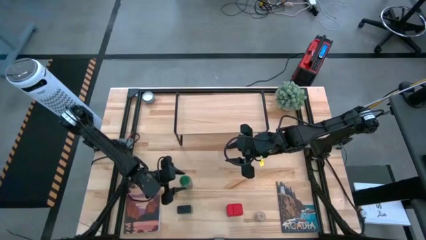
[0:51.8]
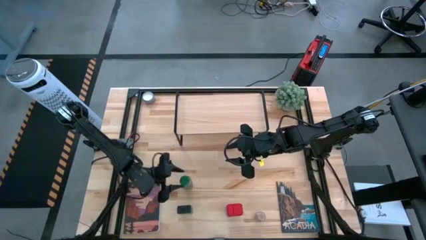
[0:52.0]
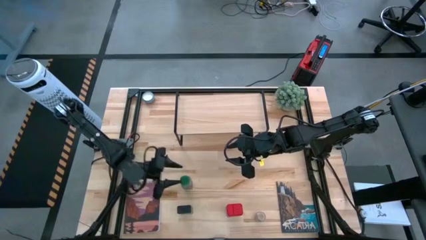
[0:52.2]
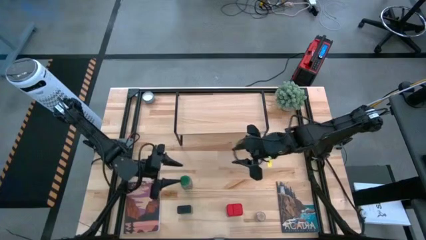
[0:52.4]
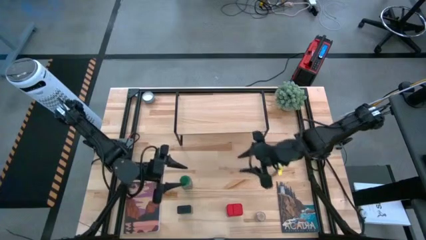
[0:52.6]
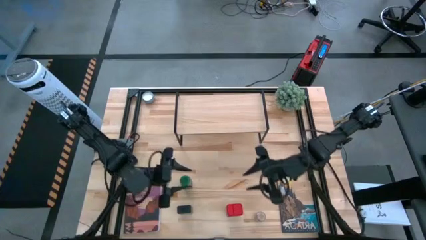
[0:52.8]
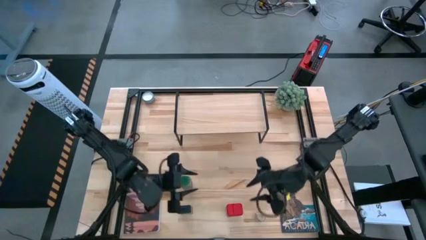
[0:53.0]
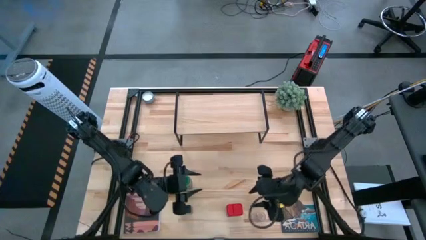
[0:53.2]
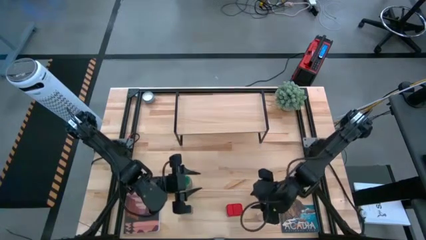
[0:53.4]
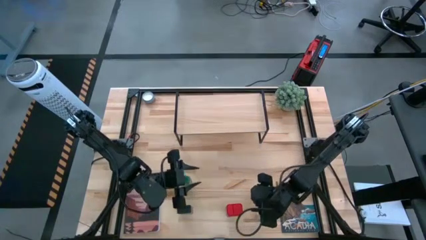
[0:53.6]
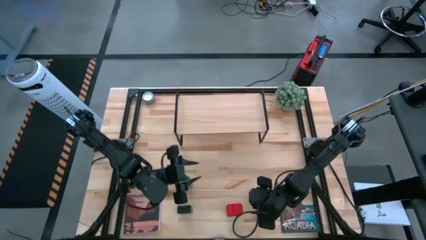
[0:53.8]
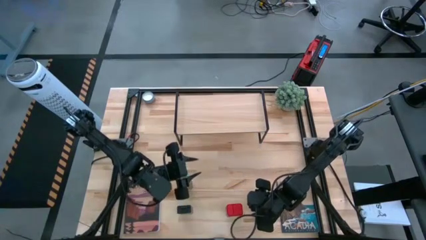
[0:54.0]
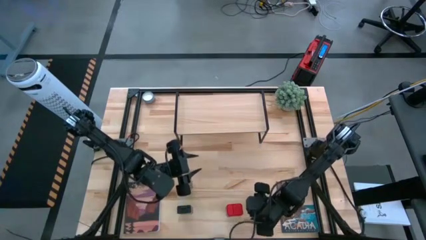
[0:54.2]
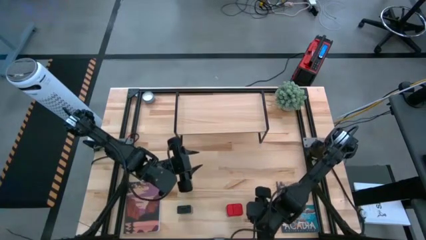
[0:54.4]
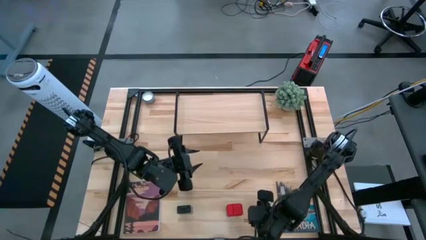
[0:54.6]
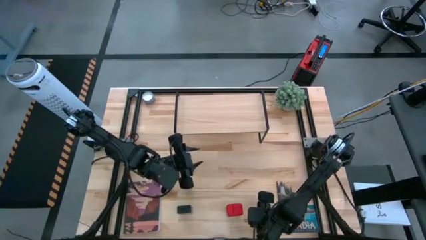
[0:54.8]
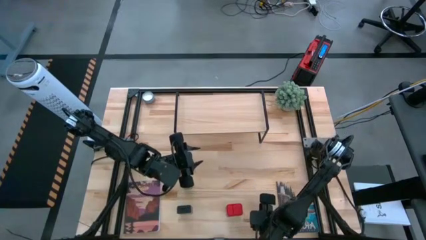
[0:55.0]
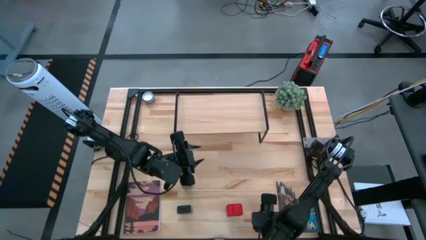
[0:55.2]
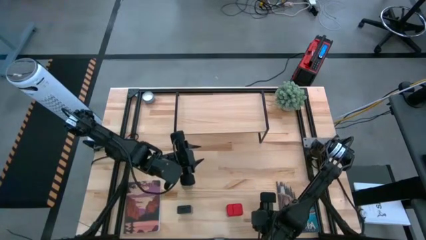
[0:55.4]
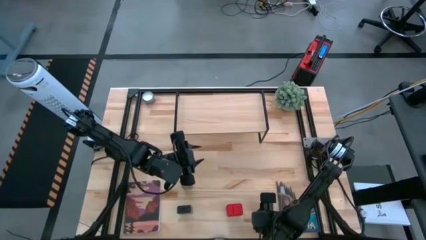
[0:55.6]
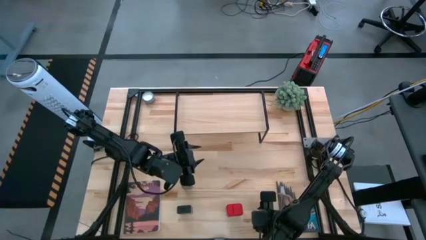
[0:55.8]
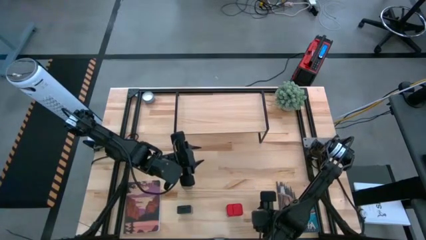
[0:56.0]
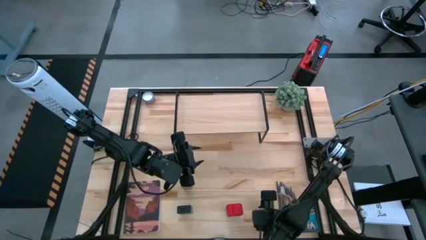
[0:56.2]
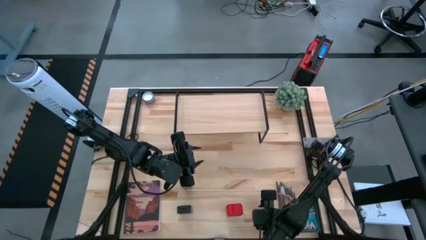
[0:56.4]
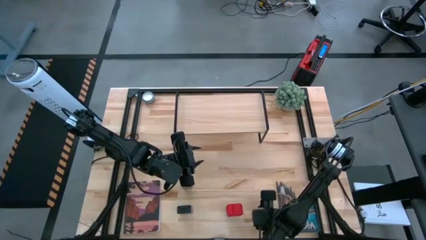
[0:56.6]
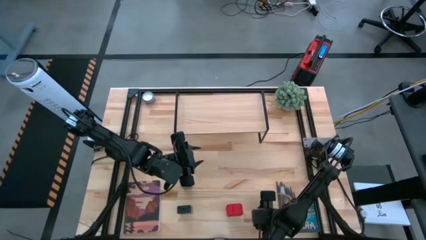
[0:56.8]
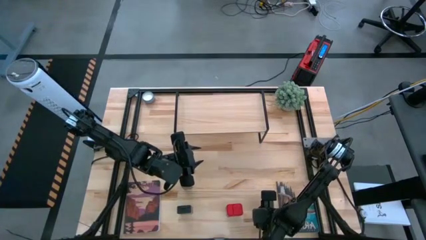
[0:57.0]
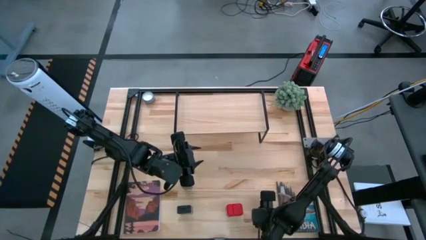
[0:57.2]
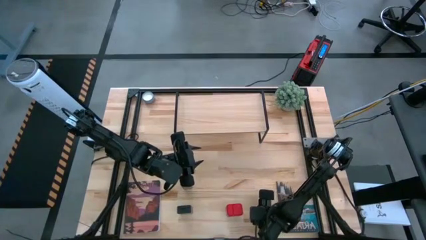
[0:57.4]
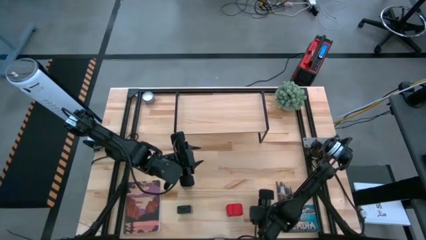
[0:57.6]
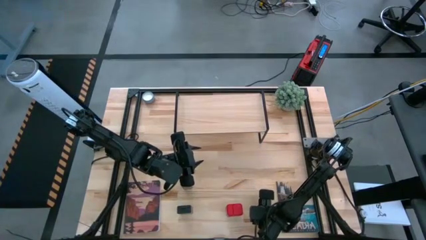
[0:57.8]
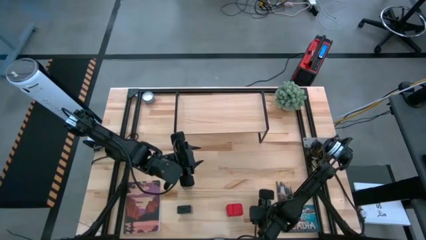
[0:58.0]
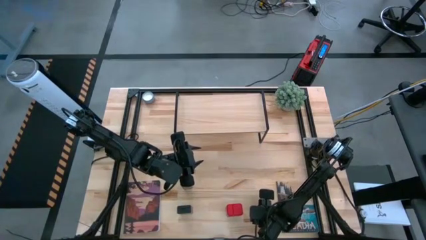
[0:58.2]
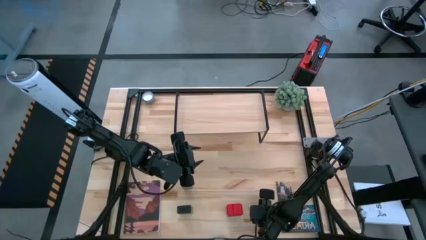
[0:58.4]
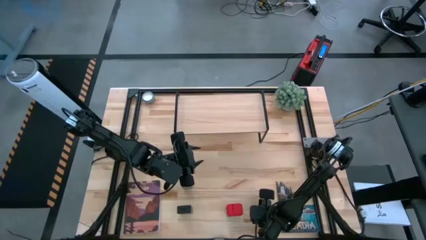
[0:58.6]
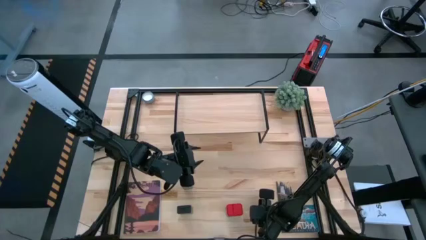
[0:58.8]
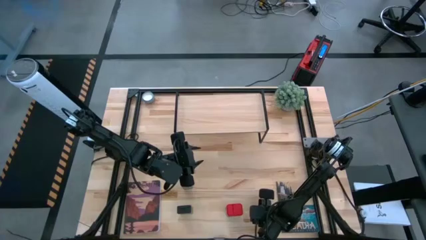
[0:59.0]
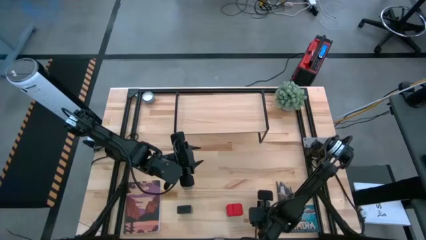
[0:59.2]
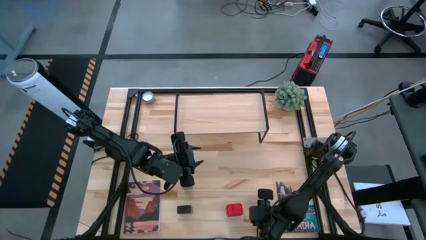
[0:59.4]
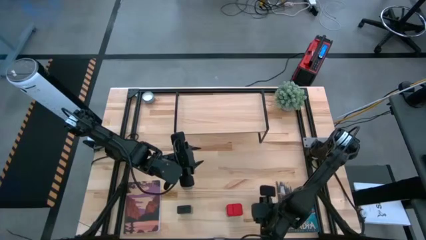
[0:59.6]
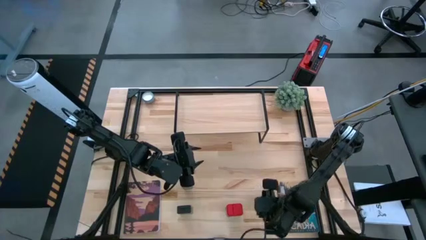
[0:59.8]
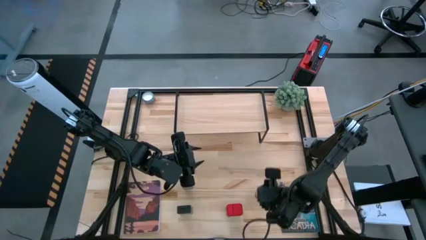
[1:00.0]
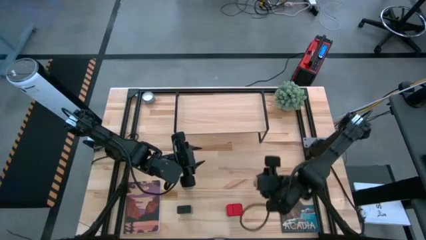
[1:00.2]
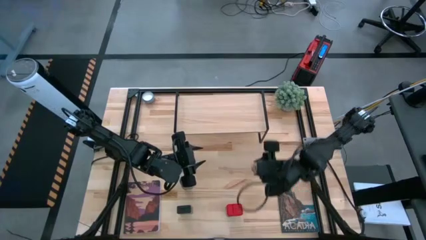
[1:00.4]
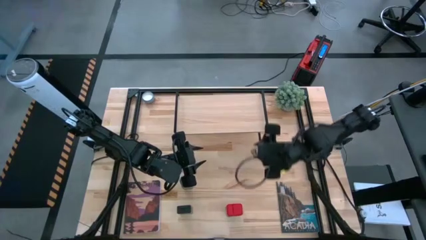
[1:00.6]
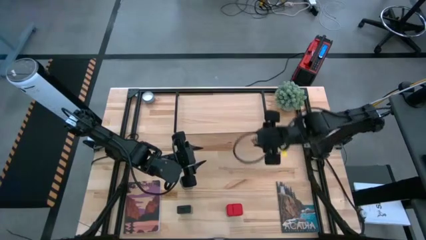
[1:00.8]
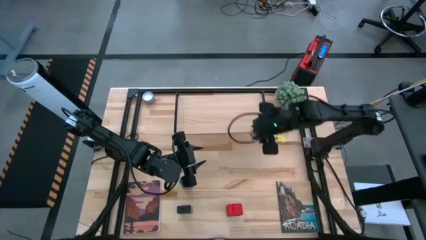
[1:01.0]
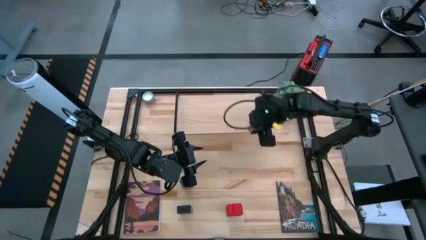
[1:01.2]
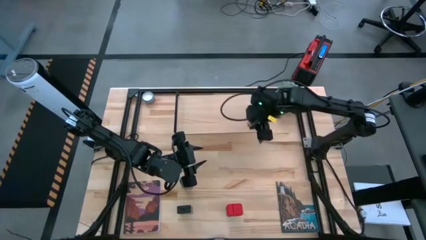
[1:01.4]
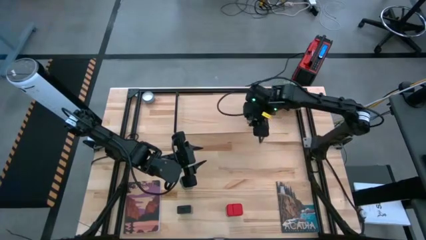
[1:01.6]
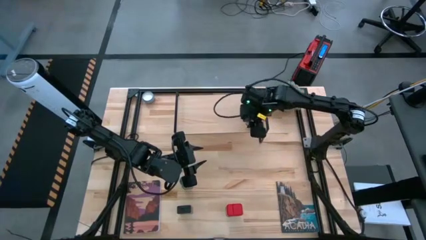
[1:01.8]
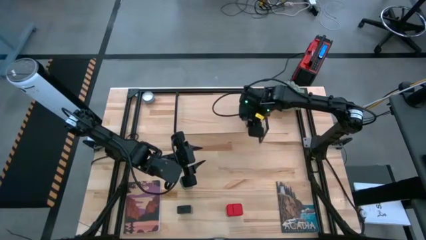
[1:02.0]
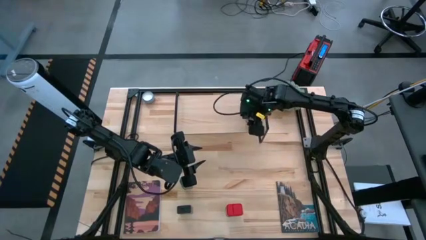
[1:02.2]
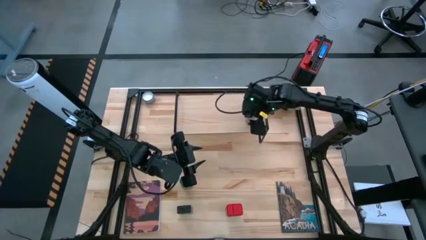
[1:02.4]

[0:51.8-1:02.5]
Task: Shelf spices
Put the transparent seasoning bottle on the shelf

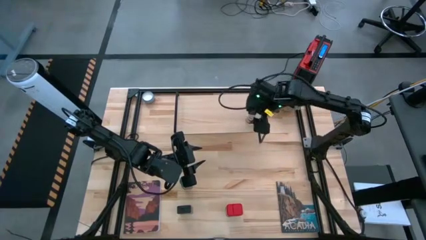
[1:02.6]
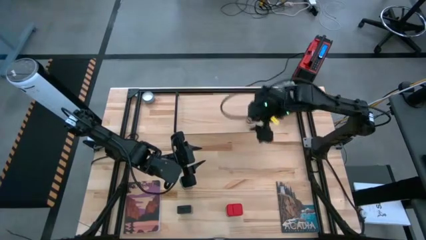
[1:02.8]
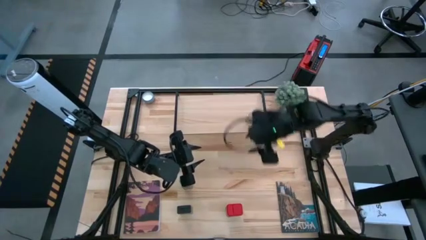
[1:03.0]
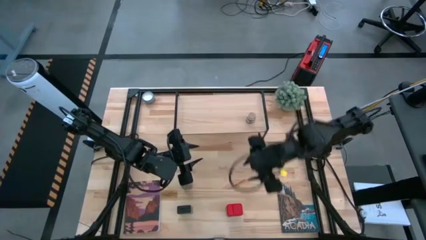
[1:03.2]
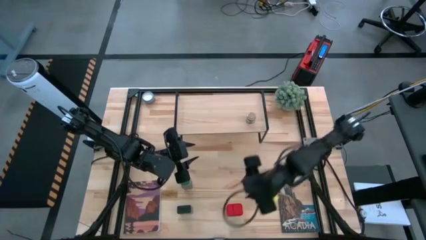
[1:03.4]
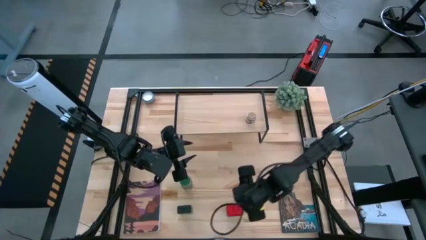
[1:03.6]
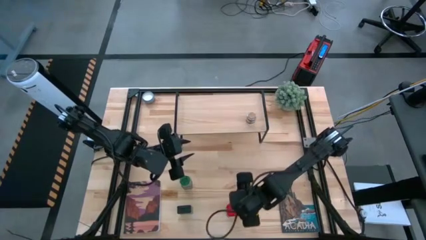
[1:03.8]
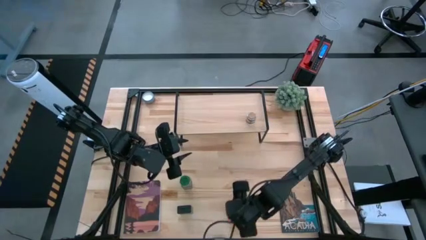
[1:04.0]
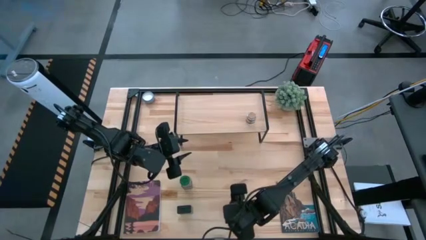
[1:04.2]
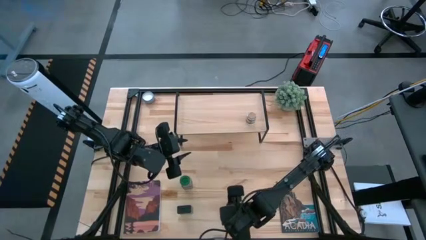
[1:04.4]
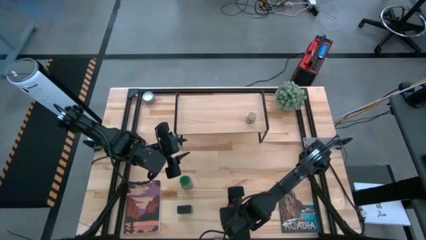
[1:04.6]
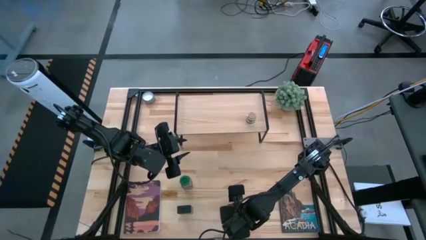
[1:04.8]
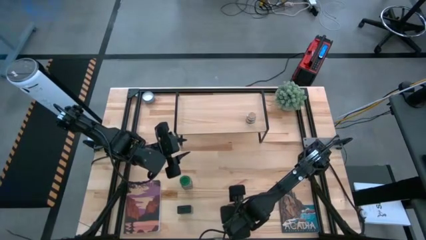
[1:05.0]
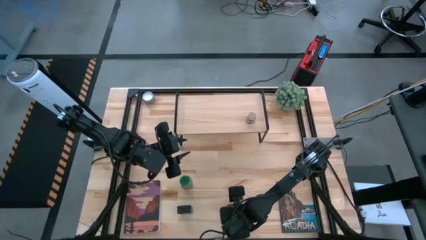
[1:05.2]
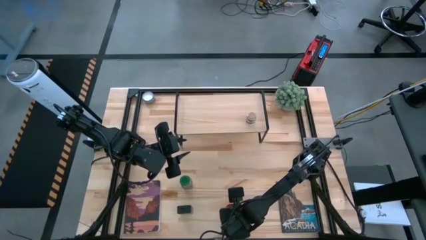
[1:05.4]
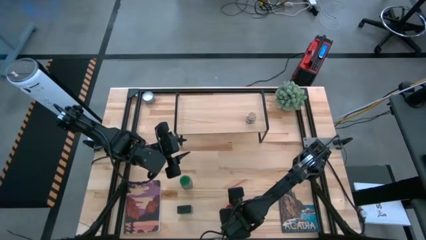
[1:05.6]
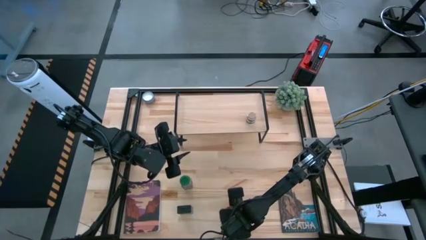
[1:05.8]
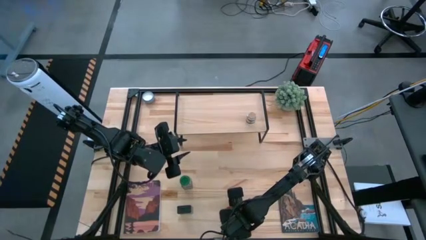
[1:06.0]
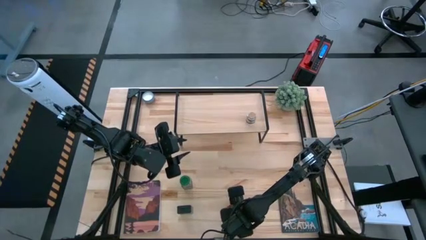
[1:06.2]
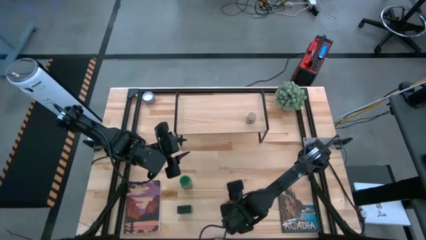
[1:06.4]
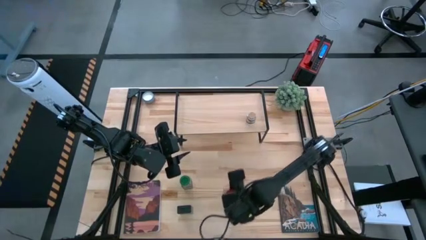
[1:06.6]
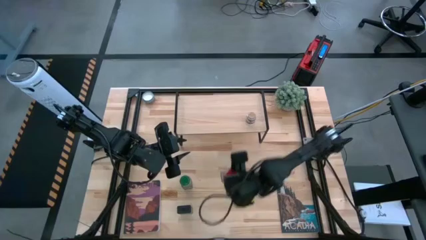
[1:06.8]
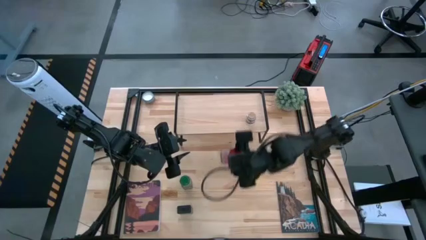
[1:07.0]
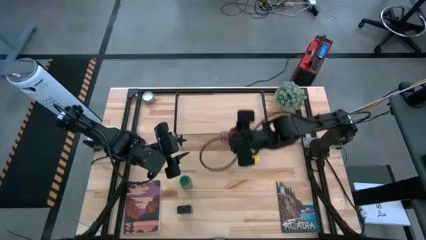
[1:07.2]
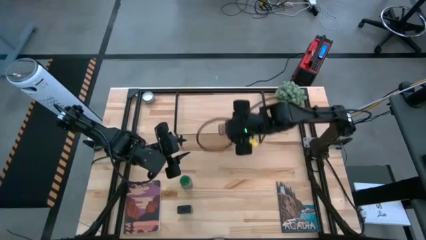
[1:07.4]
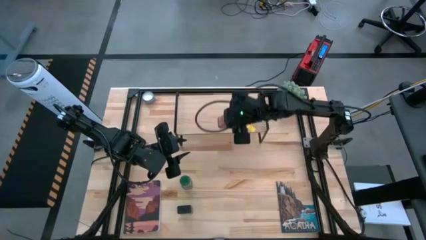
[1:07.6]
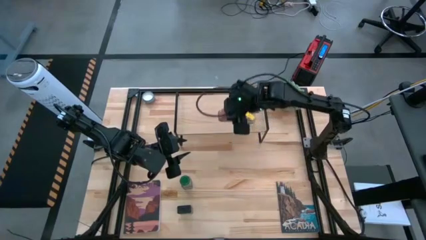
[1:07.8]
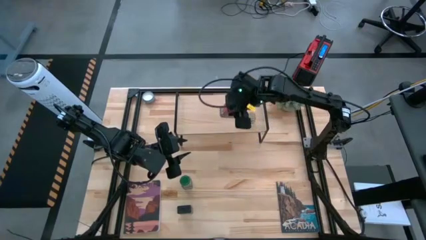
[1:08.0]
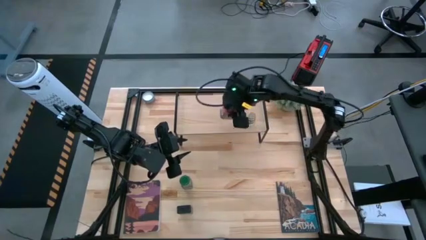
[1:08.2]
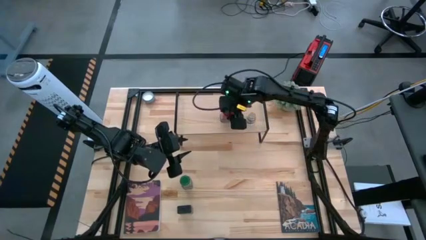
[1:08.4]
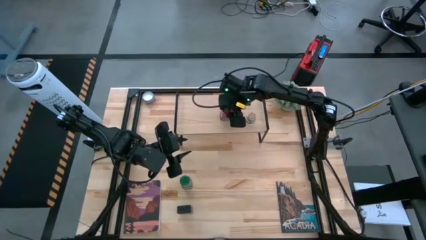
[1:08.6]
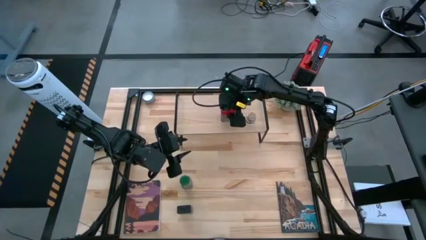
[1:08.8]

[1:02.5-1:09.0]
Put the red seasoning can on the shelf

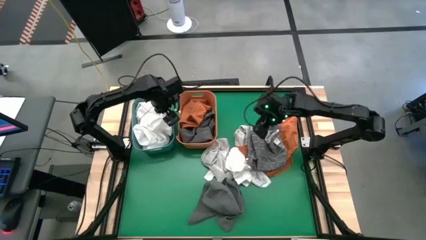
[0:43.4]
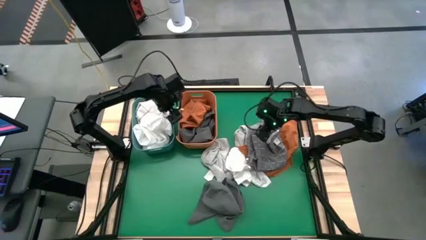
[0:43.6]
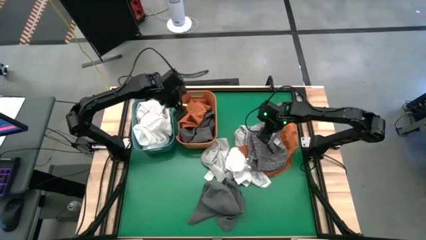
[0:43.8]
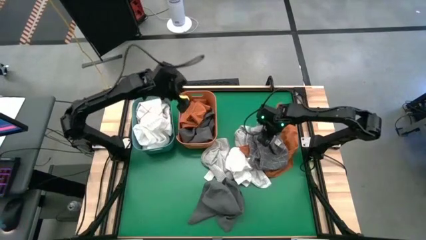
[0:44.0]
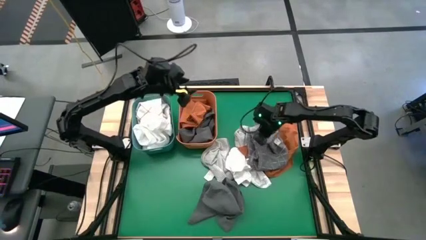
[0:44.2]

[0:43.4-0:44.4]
Task: Sort towels by color in basket
Put the gray/white towel into the orange bin
